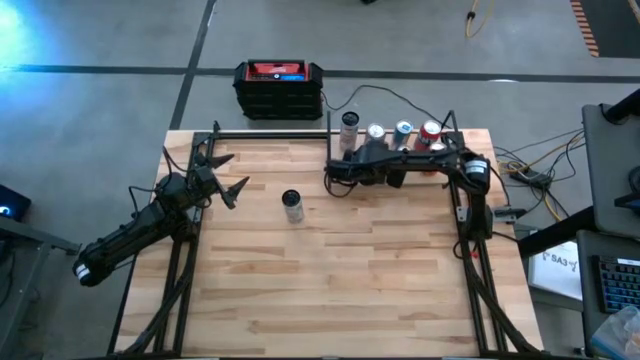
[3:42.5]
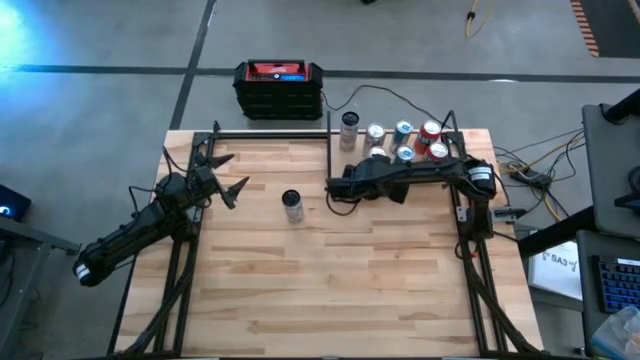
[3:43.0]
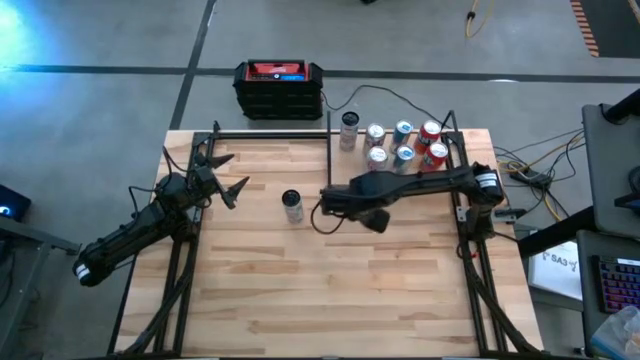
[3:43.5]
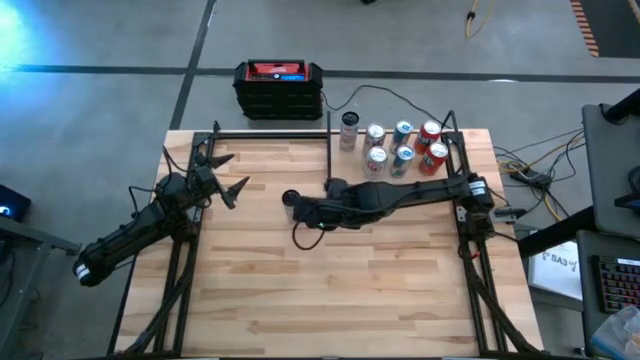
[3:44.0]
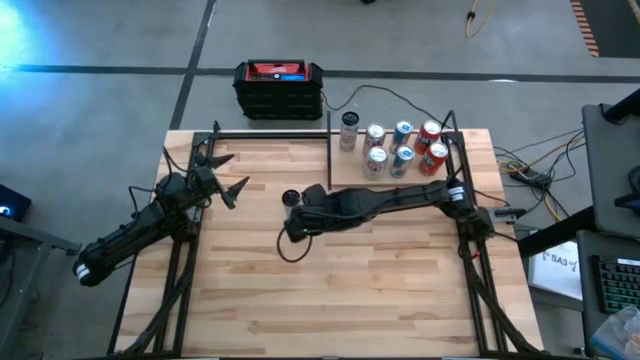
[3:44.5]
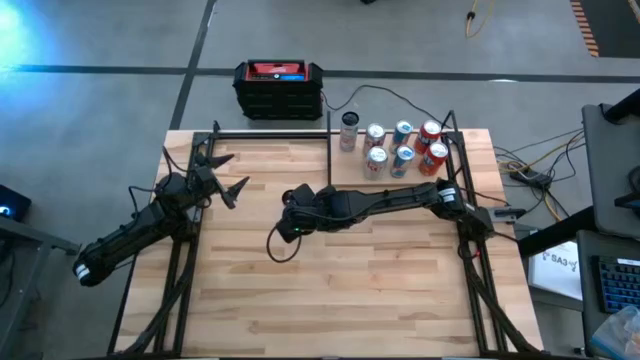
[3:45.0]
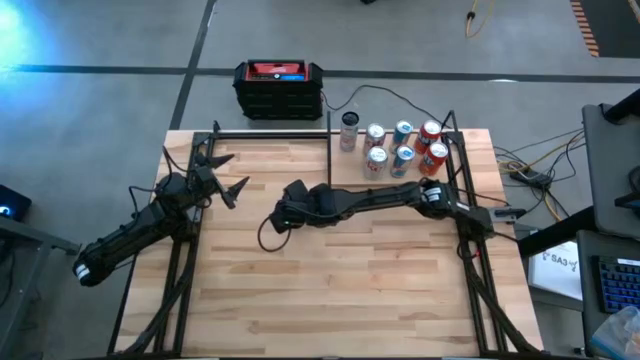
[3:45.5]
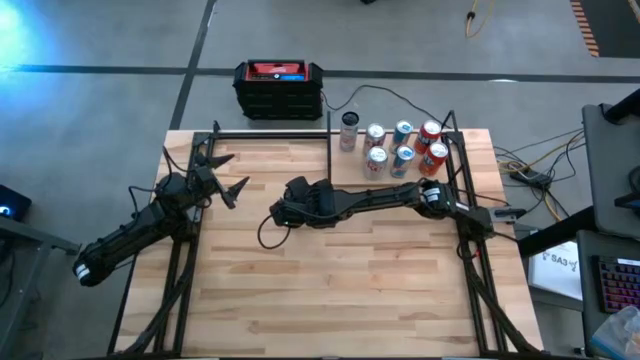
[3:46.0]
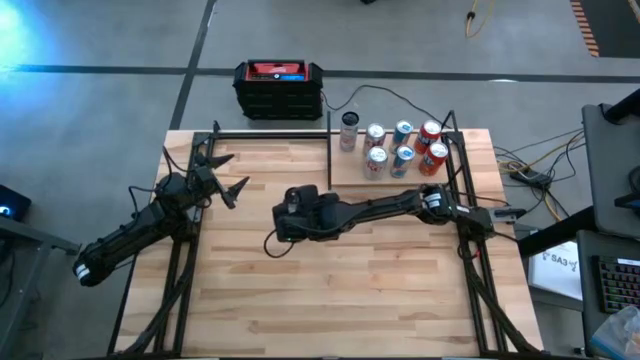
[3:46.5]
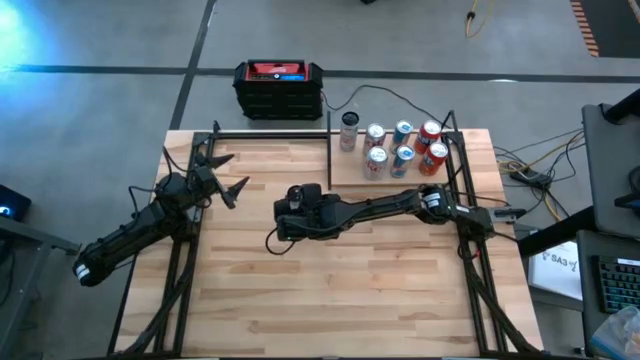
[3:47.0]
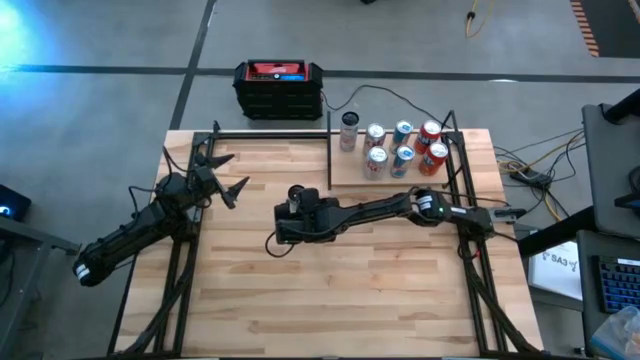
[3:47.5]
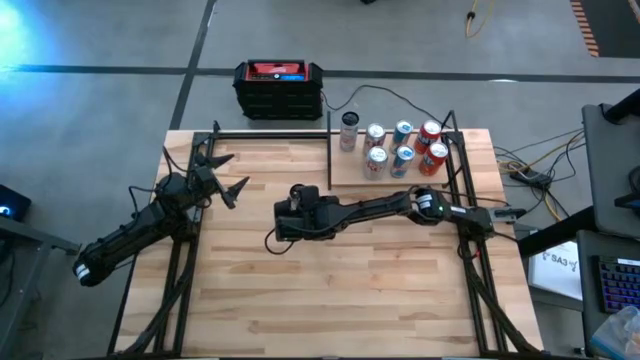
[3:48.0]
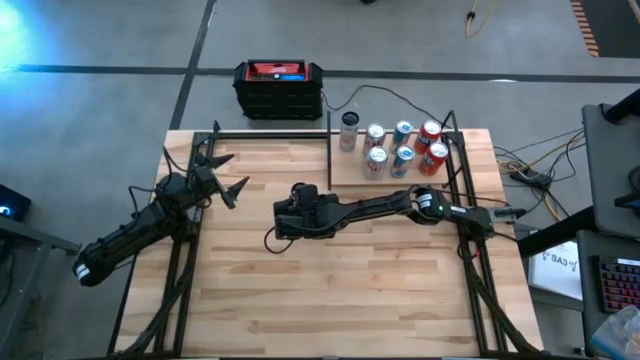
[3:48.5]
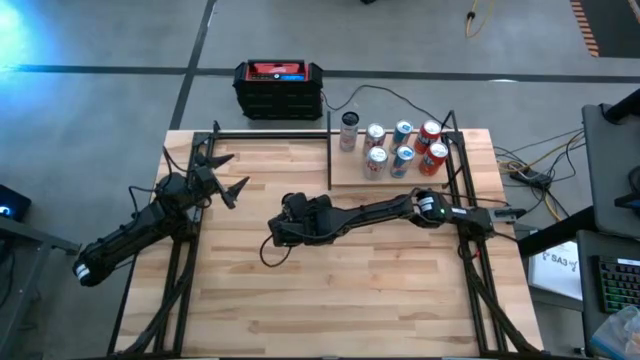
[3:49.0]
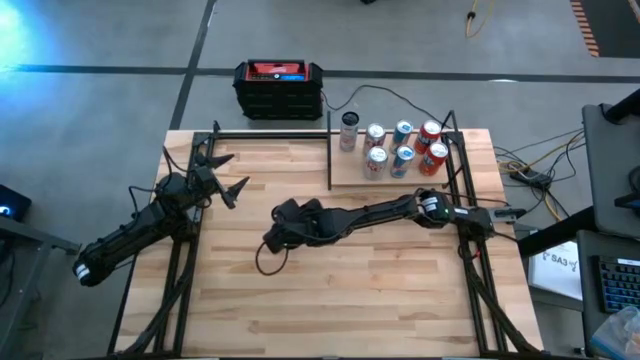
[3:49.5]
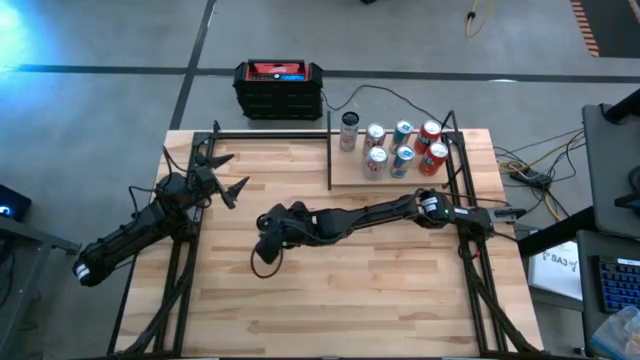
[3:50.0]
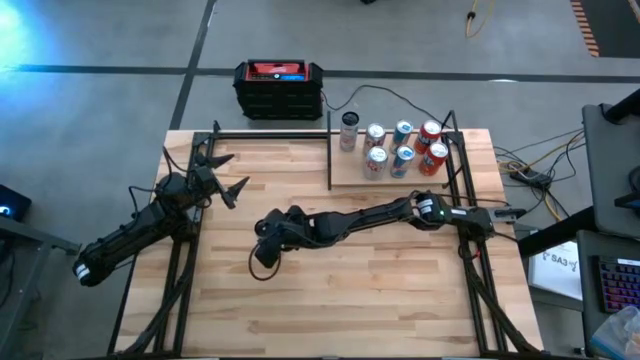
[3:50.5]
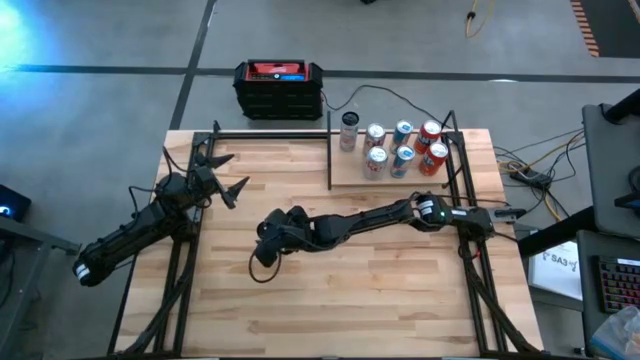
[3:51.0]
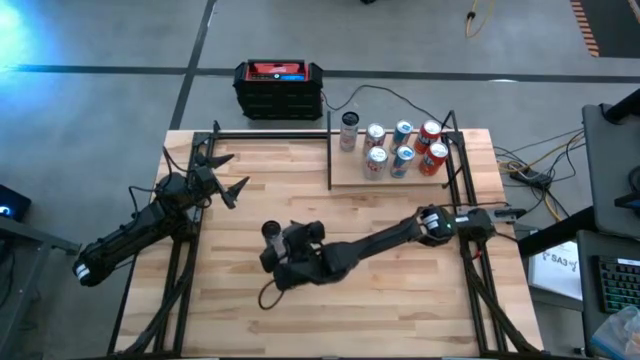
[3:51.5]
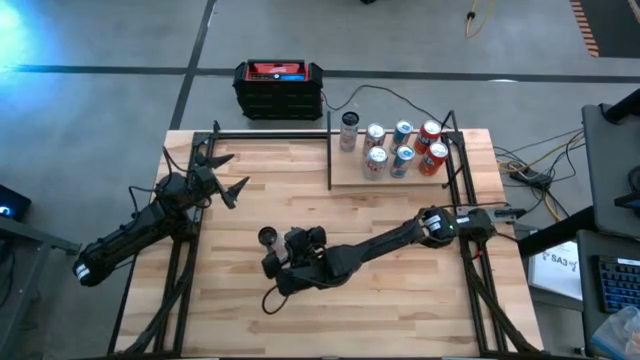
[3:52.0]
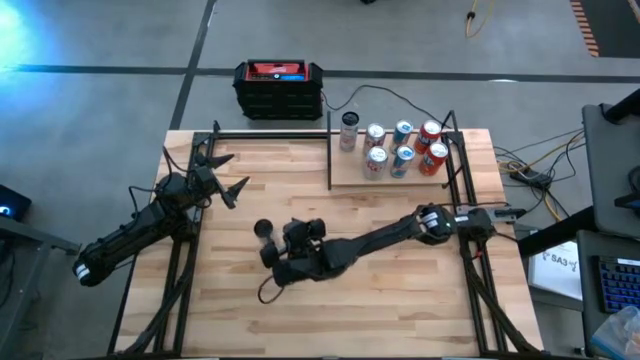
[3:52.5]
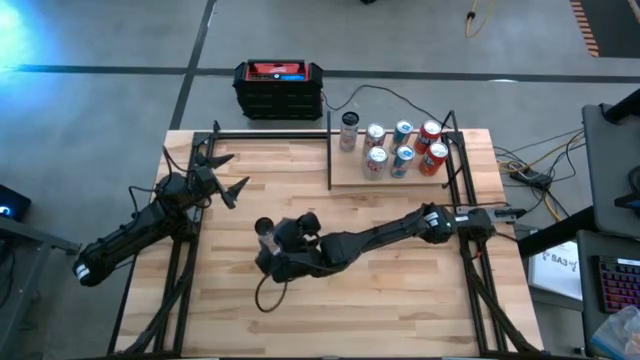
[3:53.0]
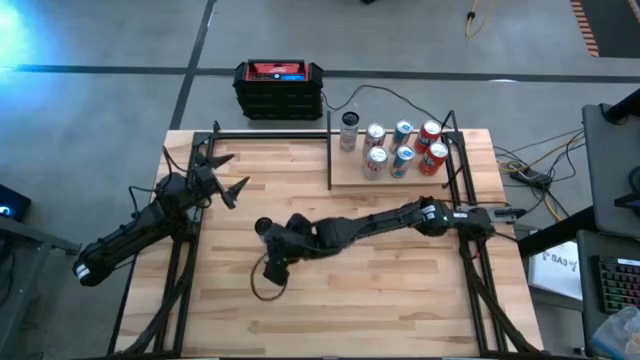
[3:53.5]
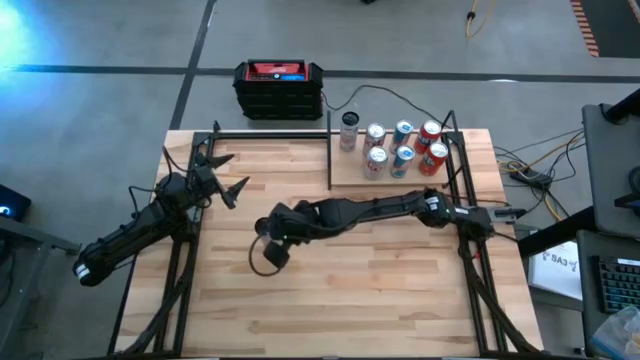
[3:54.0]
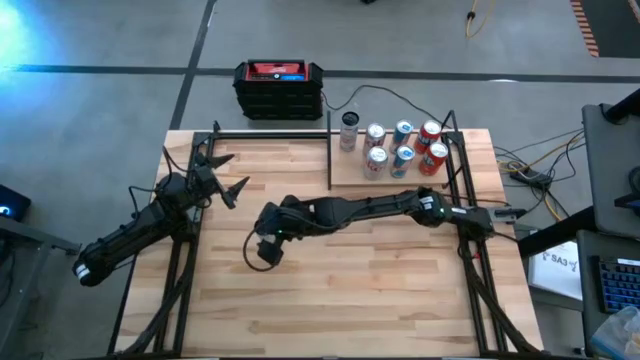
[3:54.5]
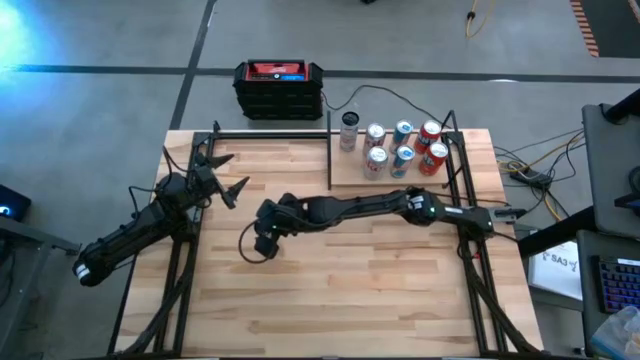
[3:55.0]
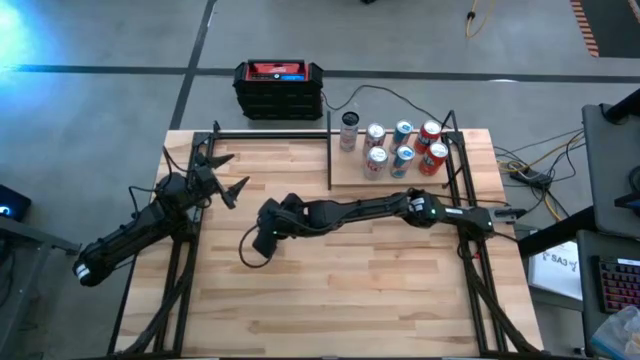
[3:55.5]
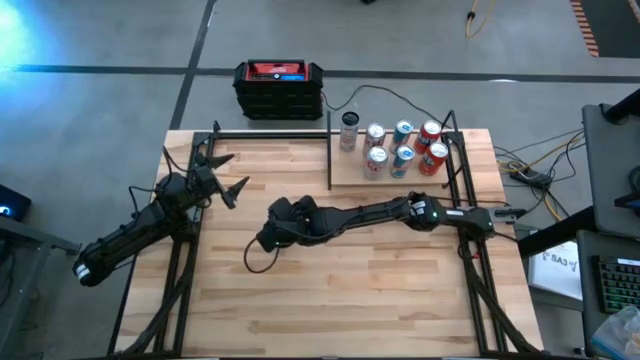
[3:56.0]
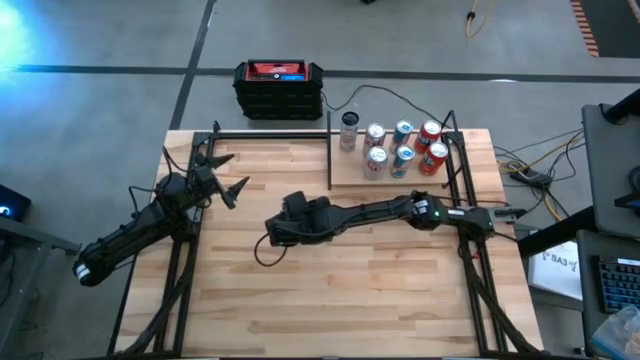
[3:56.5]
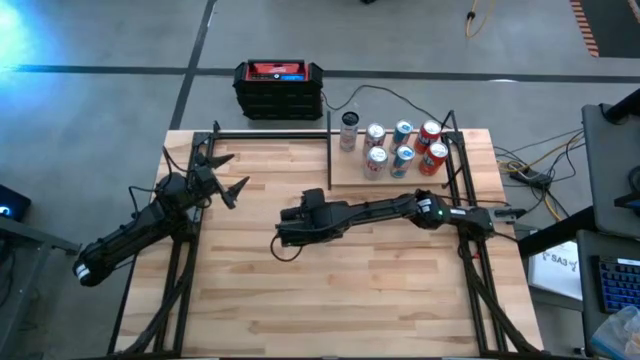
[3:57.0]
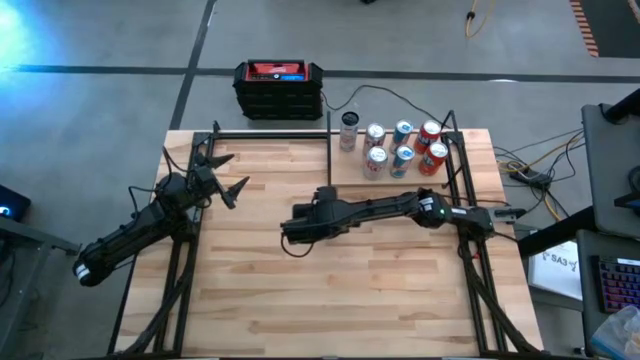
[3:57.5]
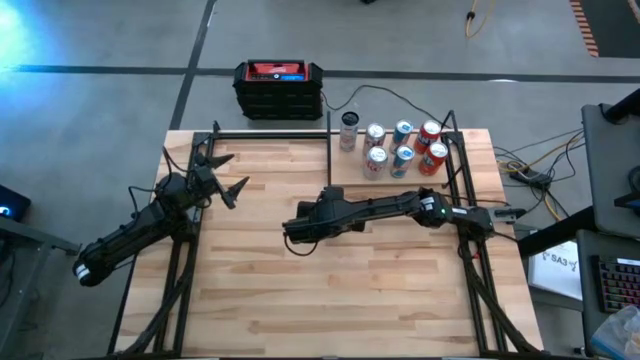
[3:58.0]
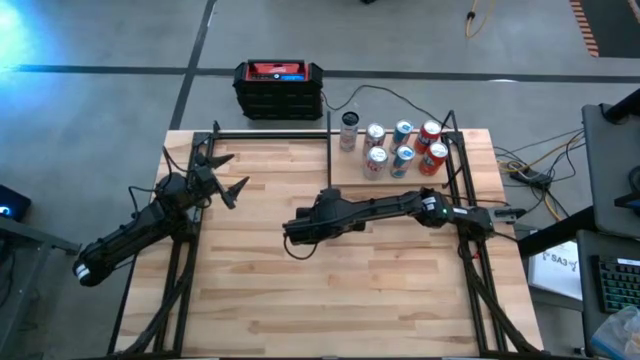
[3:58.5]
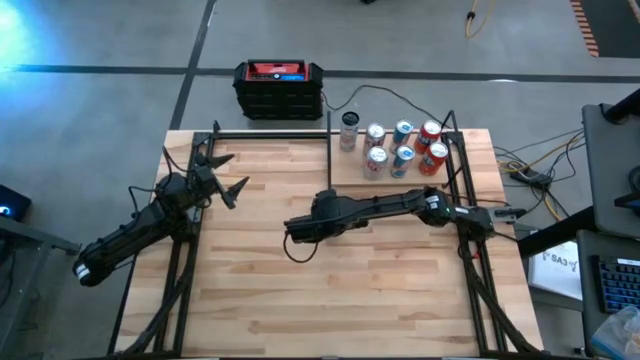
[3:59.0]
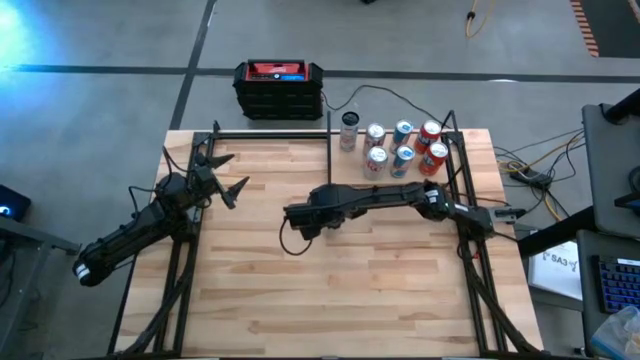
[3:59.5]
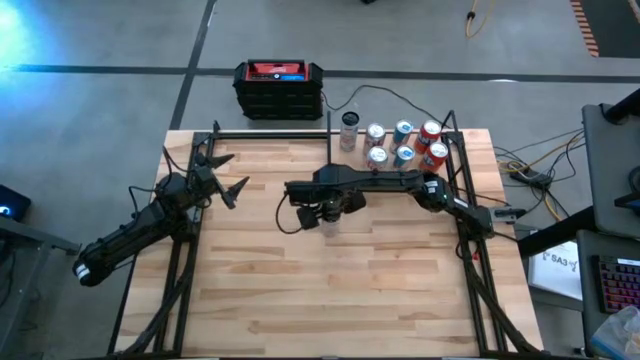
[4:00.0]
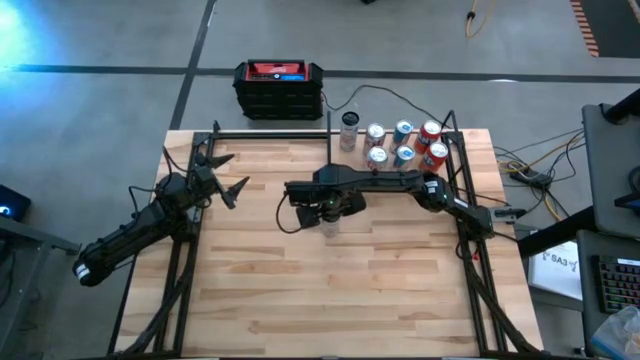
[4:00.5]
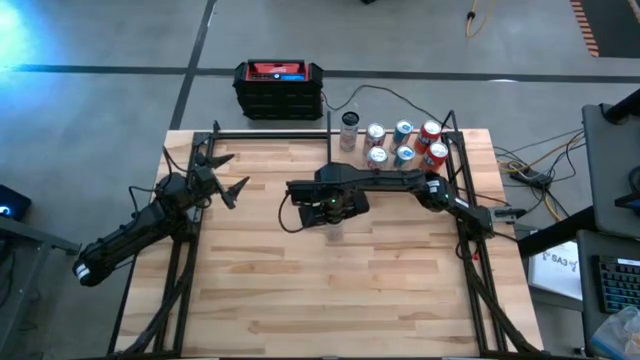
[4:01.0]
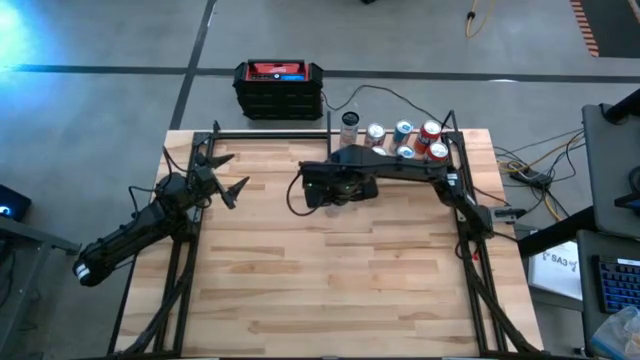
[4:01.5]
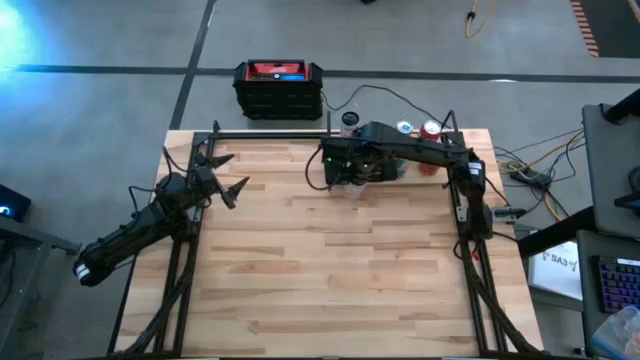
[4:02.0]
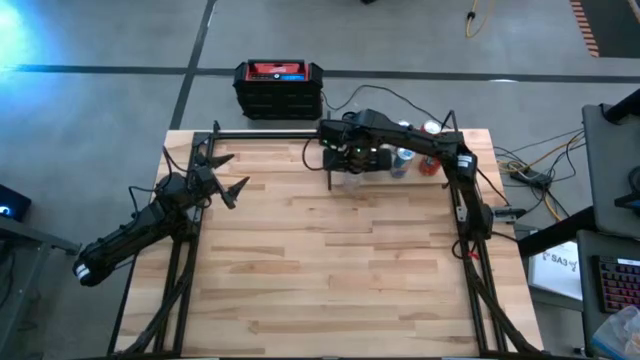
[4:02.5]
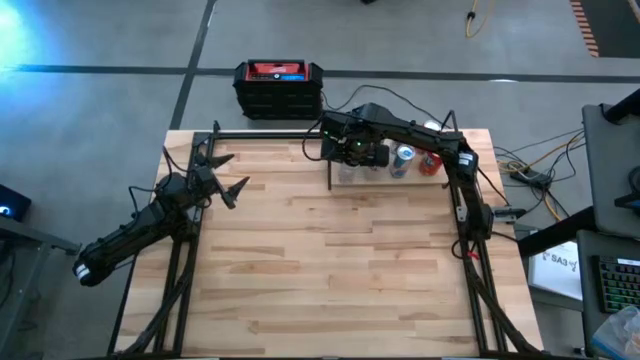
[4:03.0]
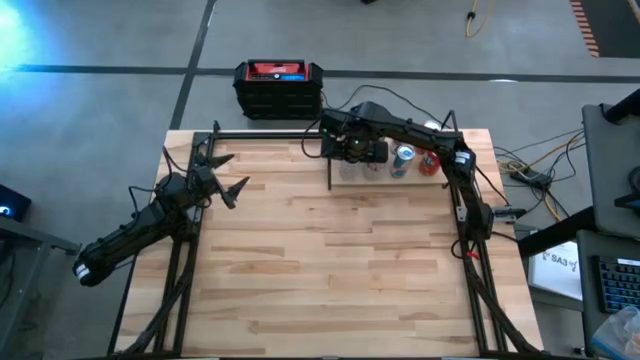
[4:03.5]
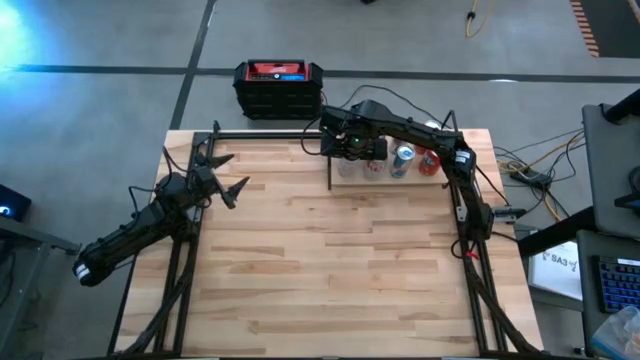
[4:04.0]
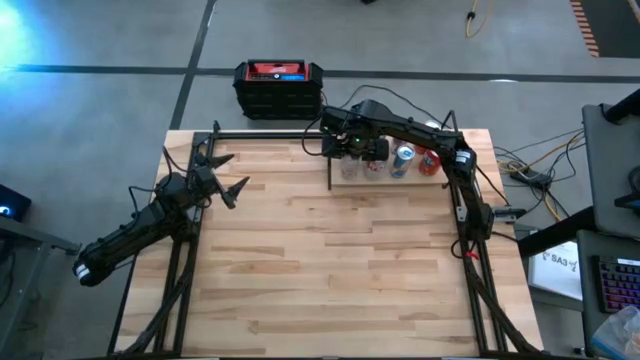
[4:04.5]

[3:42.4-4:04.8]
Task: Place canned beverage on shelf
Put the white pink soda can on the shelf aligned with the other white pink soda can
